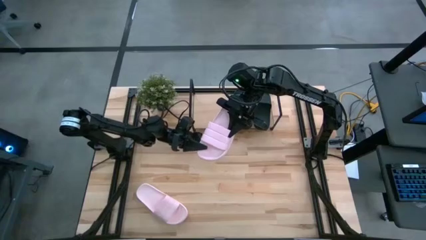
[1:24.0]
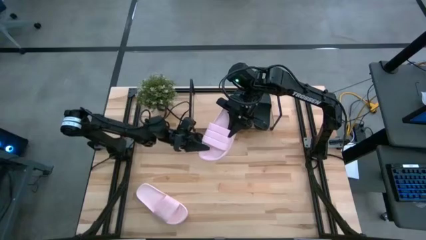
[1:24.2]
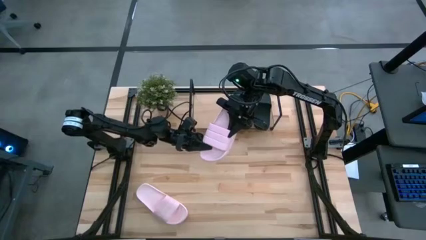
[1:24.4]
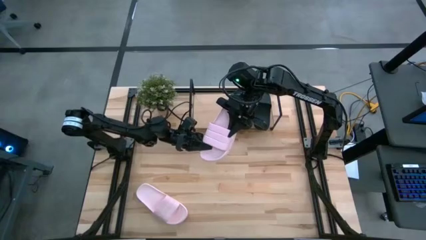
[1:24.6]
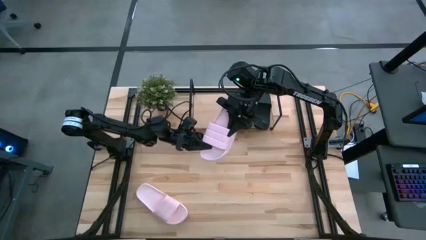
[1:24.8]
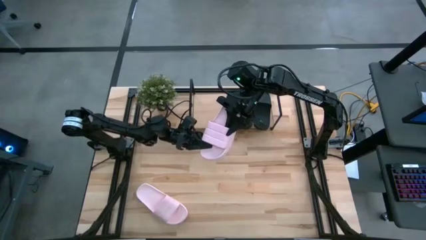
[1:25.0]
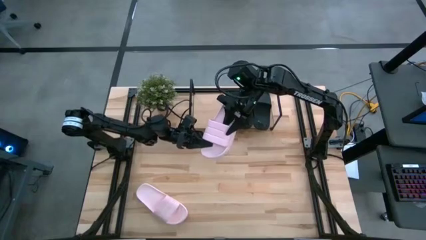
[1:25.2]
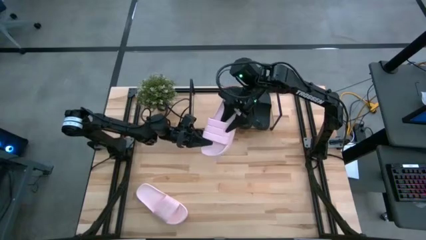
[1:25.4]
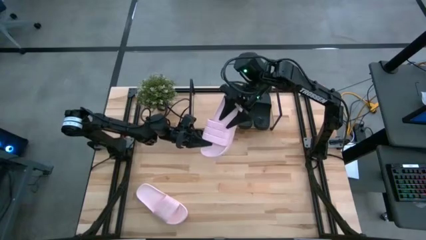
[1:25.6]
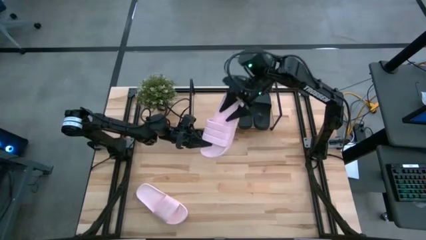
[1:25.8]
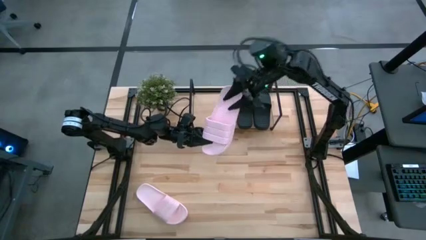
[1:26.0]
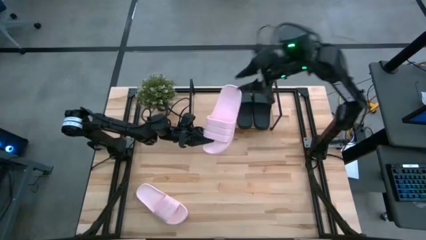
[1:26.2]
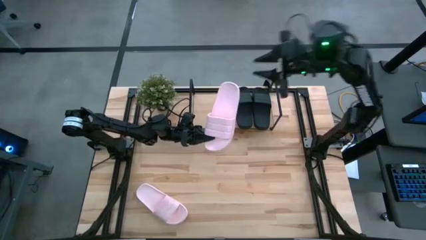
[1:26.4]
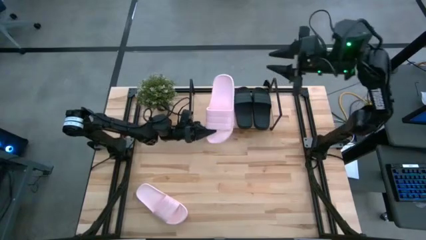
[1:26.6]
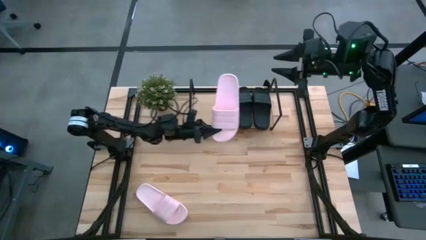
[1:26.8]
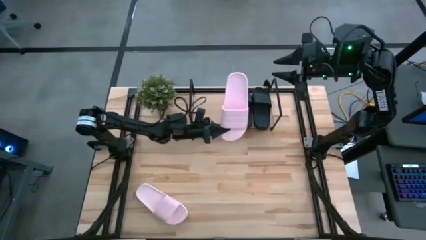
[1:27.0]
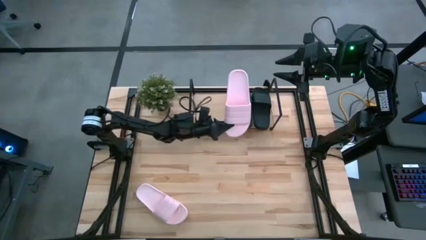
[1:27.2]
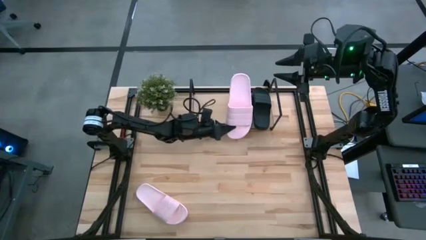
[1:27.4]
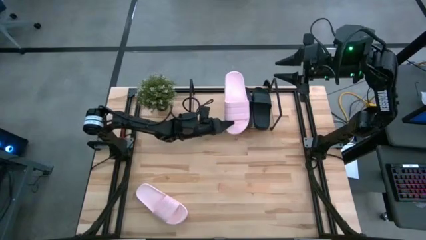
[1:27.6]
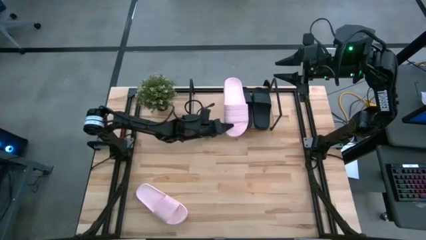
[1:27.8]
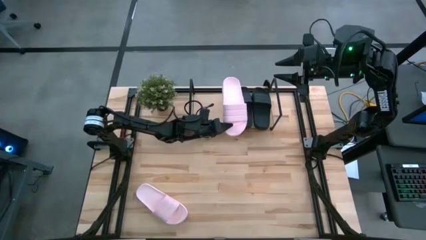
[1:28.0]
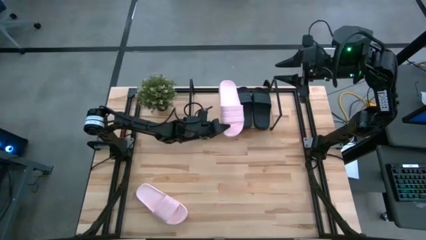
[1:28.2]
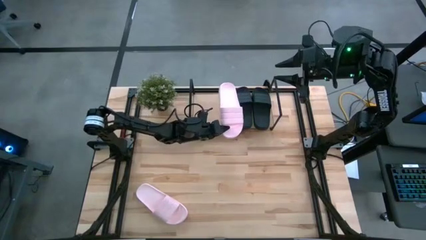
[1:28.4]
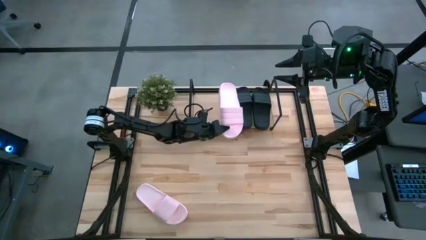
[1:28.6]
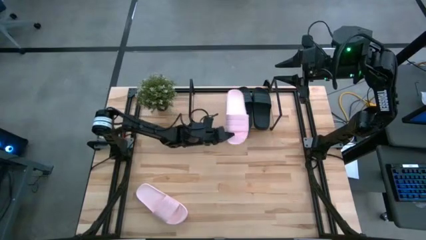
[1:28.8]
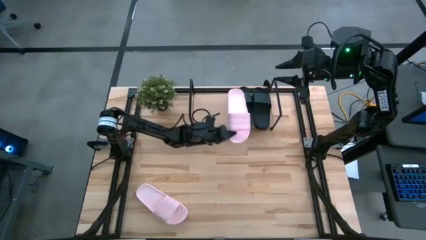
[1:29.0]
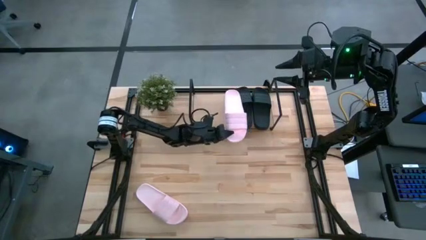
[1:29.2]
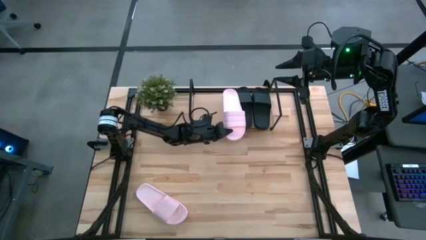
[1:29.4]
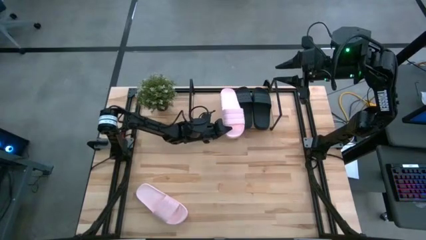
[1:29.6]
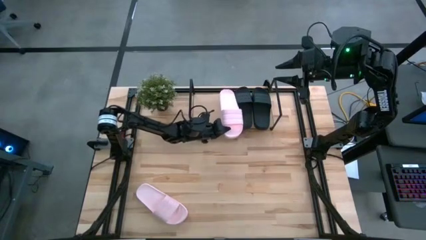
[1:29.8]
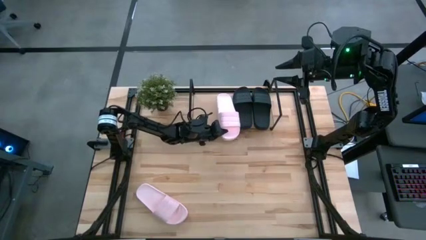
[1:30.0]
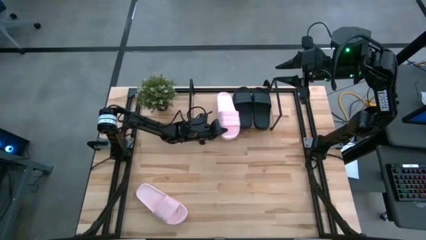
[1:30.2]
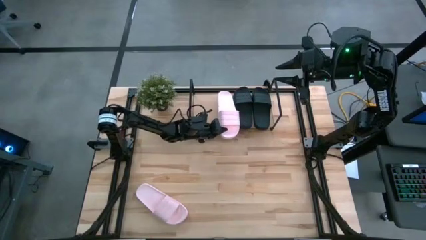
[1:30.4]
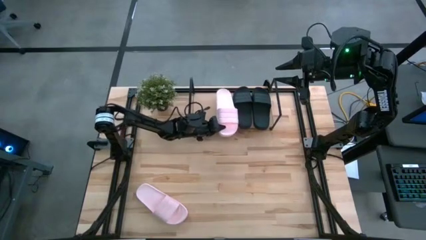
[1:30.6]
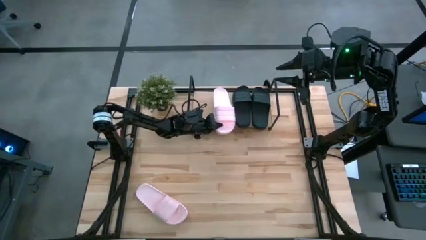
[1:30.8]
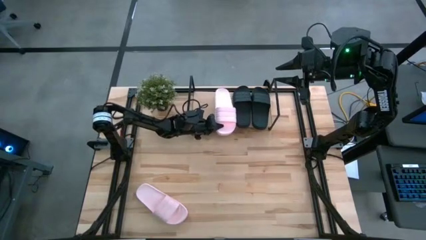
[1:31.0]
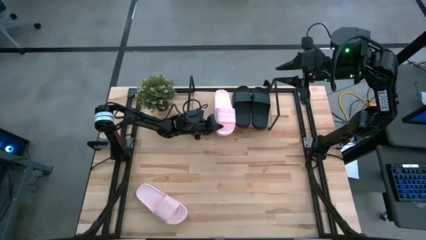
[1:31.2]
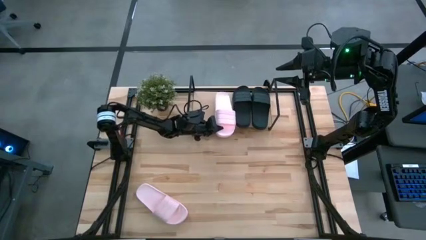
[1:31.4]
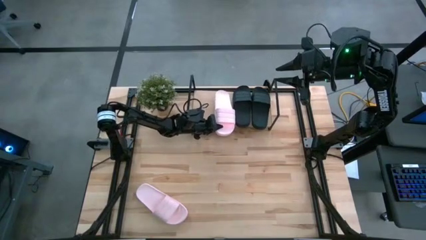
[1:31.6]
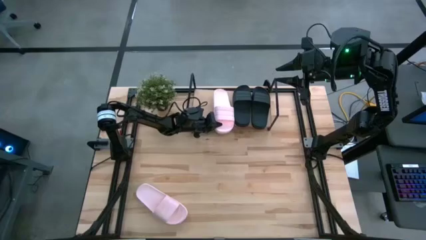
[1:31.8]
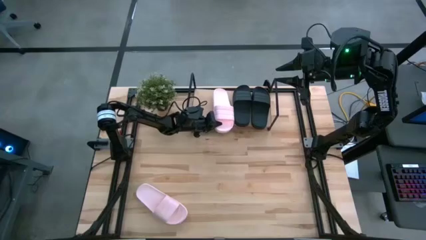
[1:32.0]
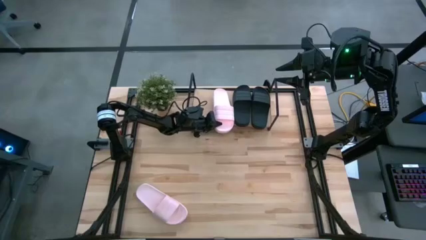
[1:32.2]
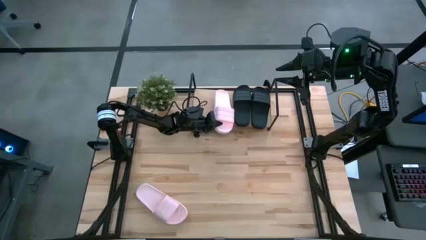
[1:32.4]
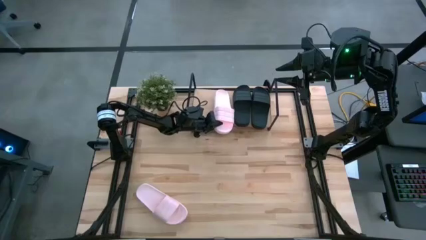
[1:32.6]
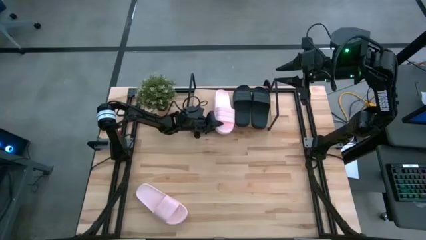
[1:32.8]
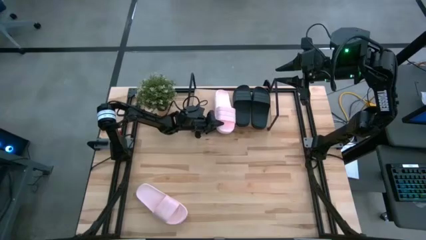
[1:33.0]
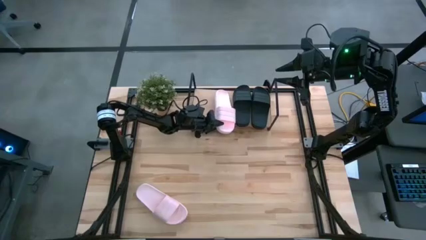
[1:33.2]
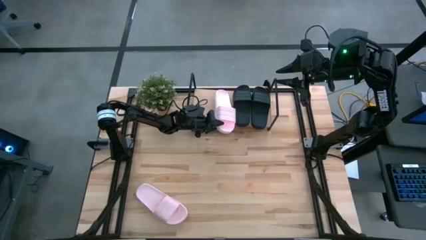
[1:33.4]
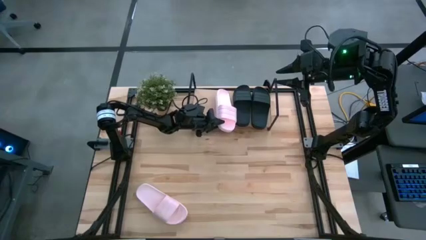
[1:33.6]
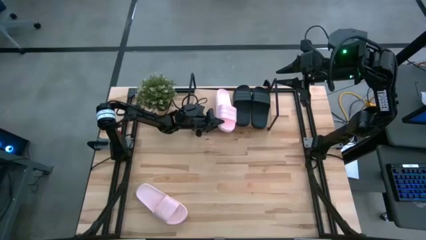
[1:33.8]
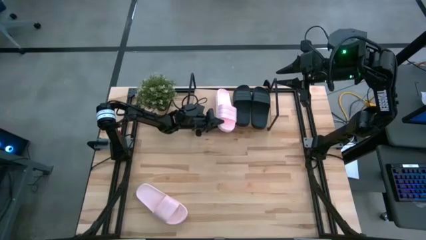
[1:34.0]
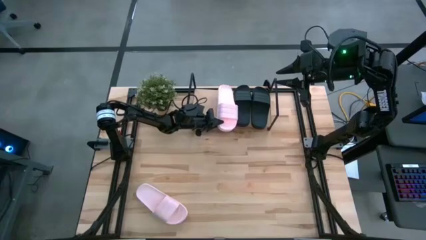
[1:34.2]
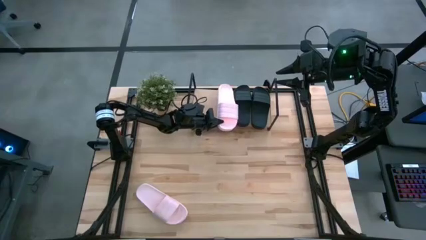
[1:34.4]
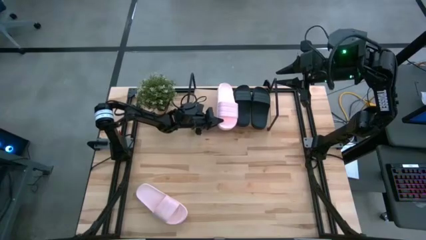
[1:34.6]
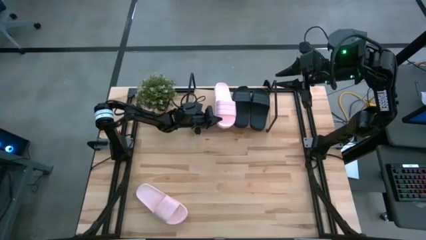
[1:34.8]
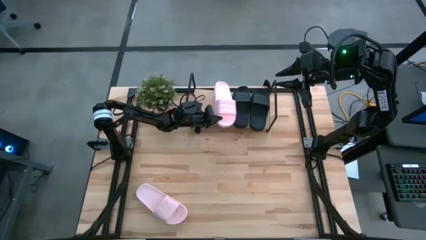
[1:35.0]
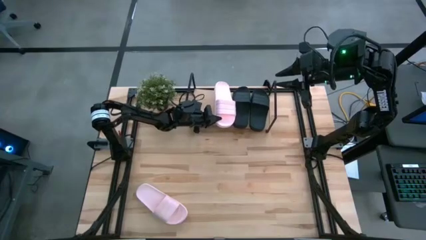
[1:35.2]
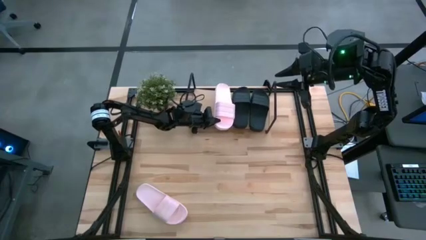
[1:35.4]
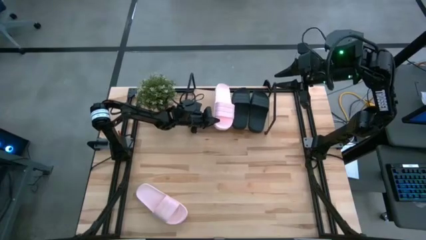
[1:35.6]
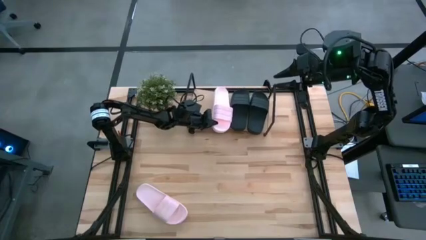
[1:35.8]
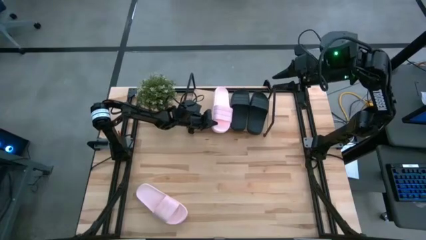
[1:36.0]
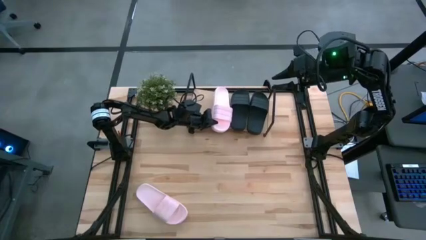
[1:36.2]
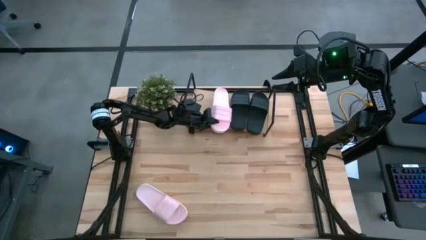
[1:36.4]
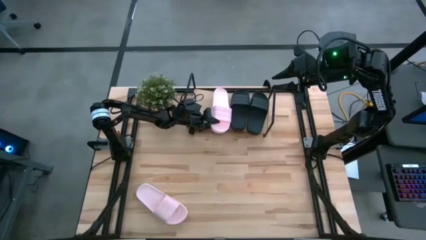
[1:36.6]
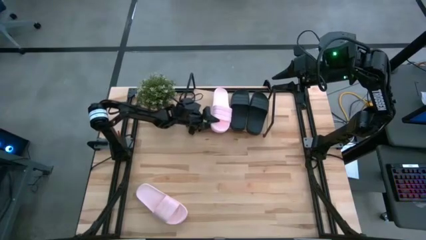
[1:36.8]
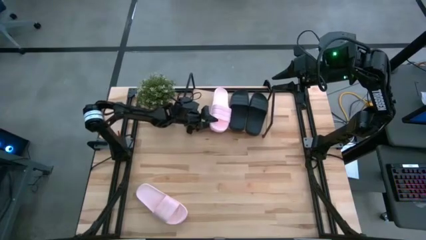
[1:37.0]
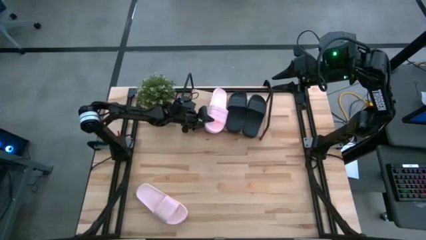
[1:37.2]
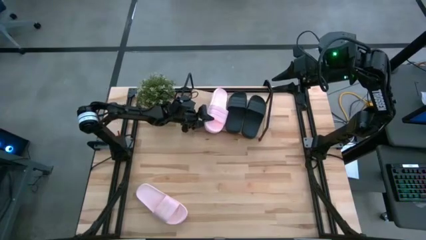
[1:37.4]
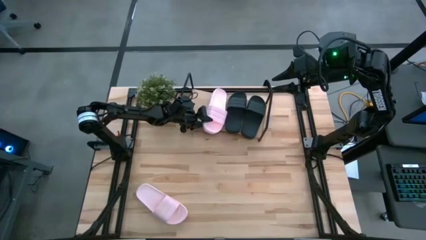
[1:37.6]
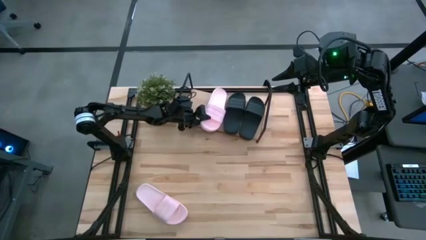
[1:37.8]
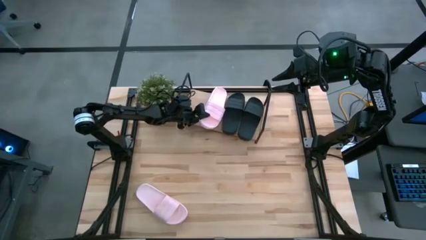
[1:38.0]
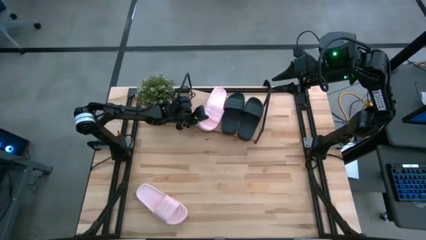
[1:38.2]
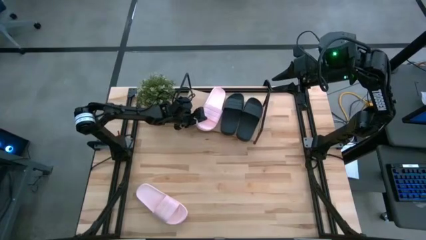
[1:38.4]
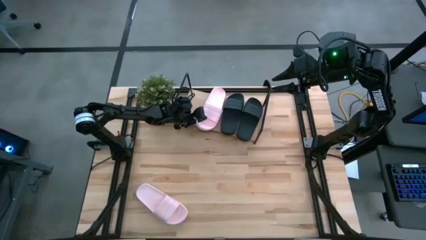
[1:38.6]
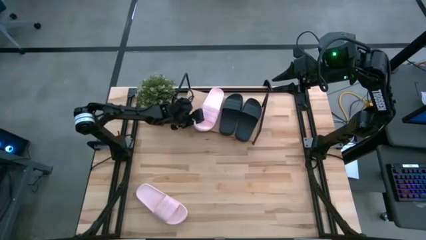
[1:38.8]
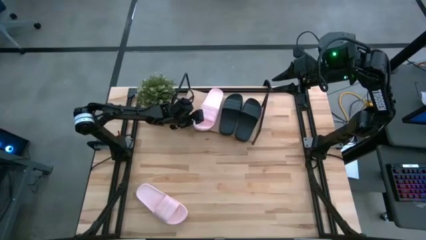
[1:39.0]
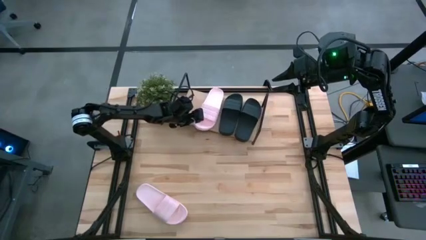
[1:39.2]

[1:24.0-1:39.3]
Task: Pick and place slides into the shelf
Put the top pink slipper on the shelf
